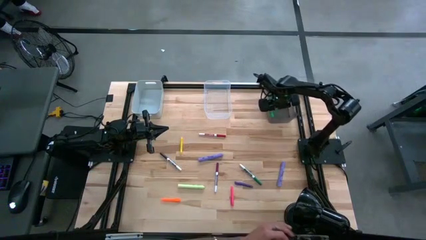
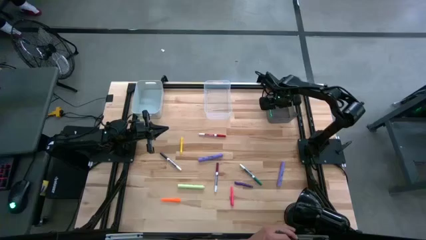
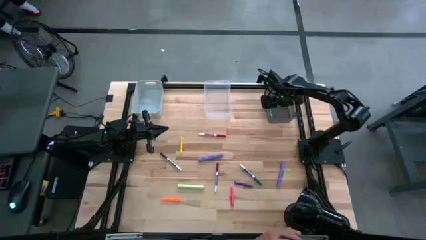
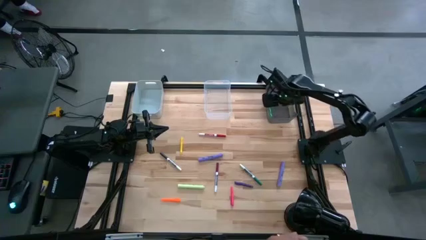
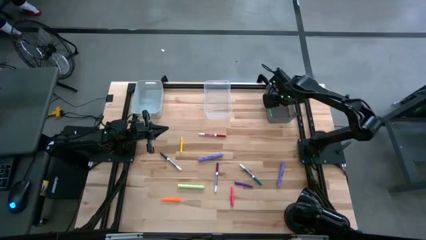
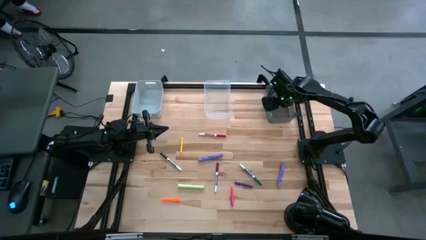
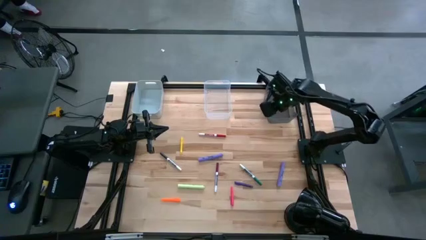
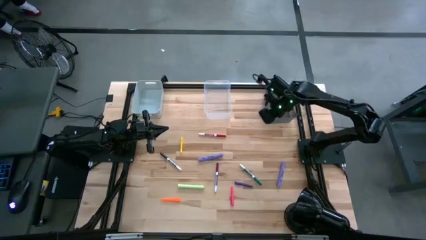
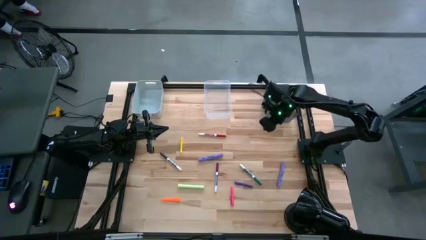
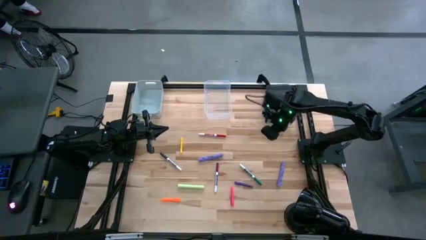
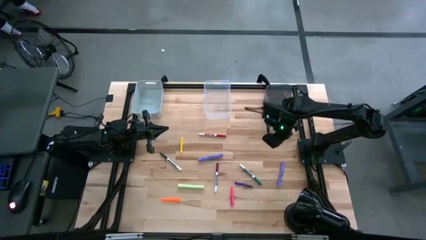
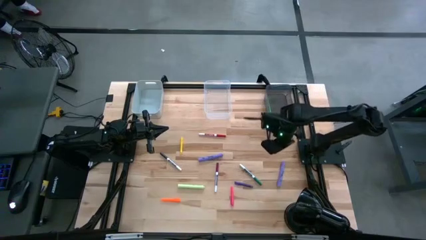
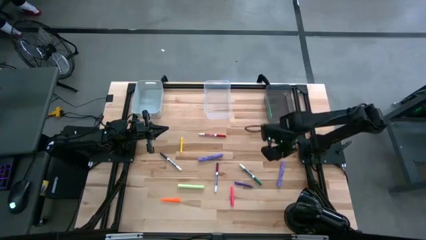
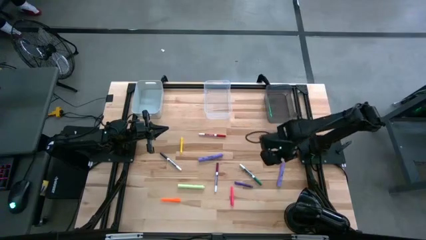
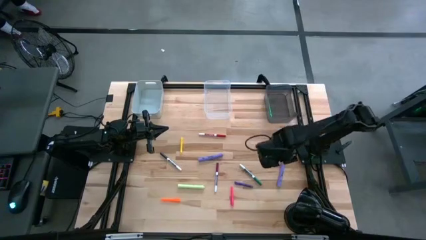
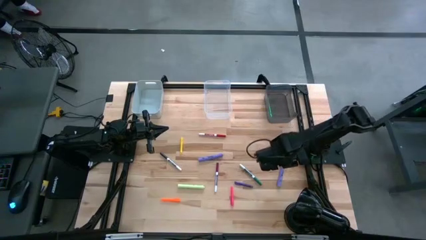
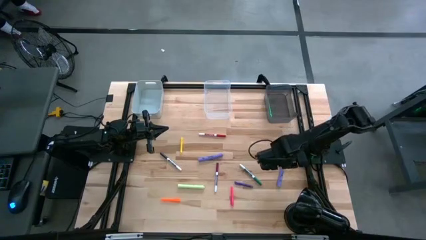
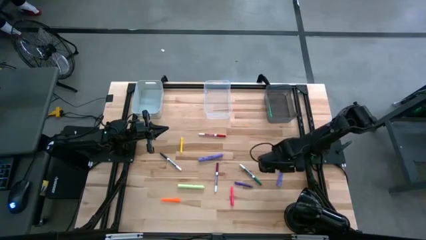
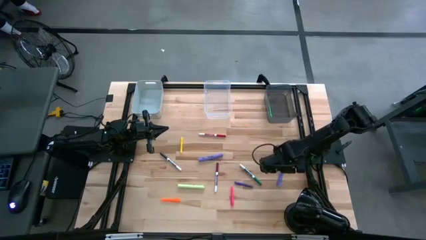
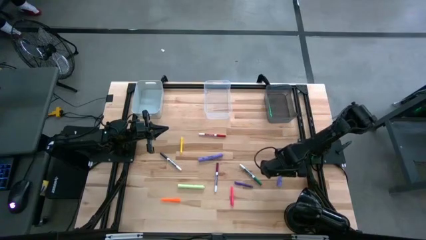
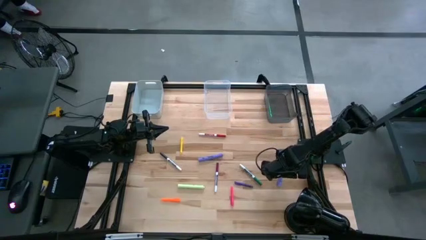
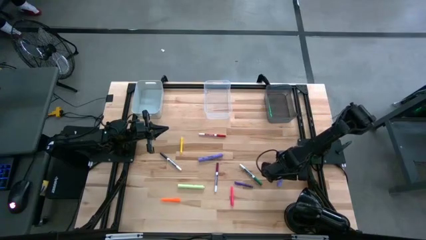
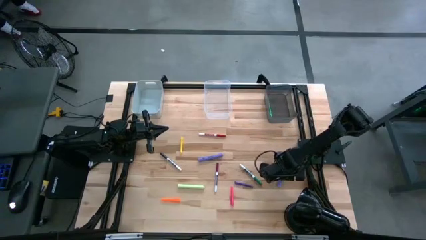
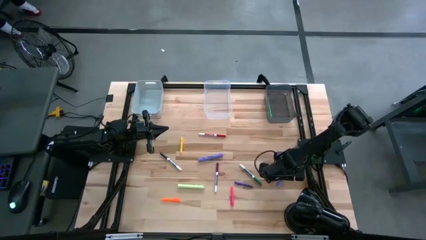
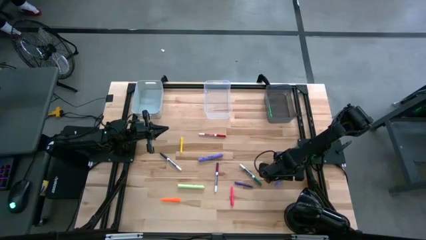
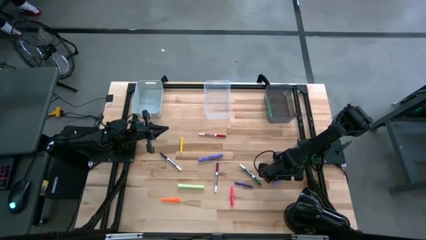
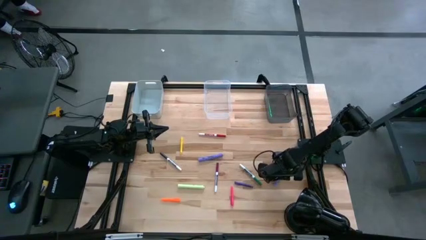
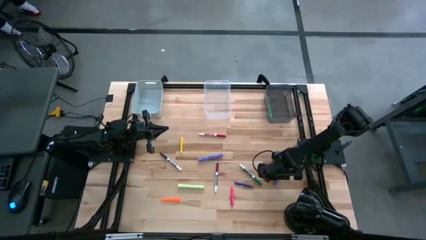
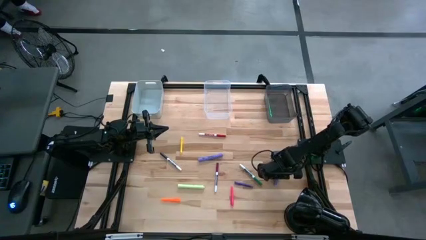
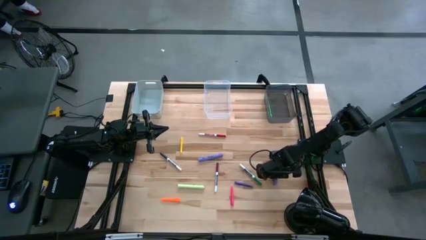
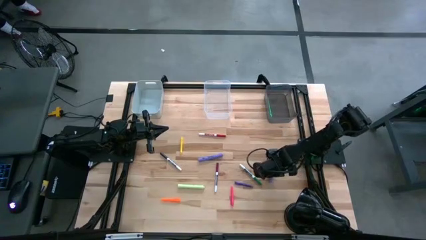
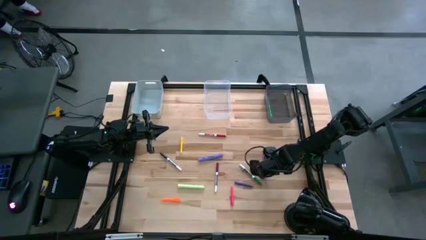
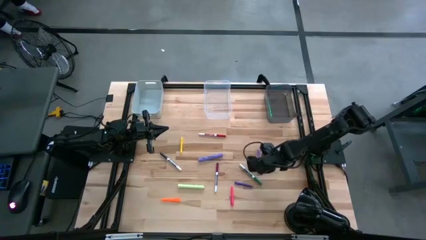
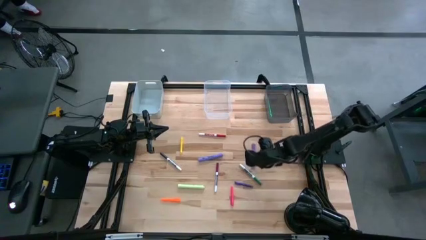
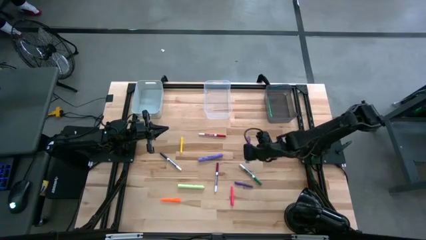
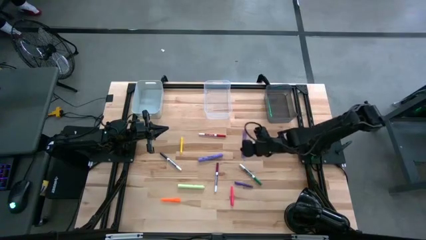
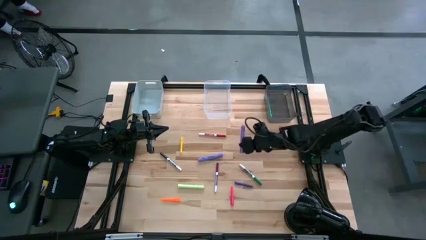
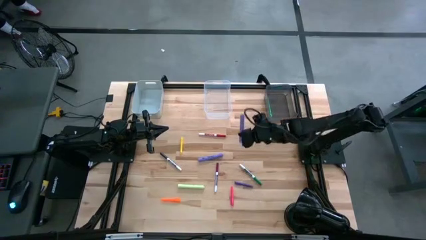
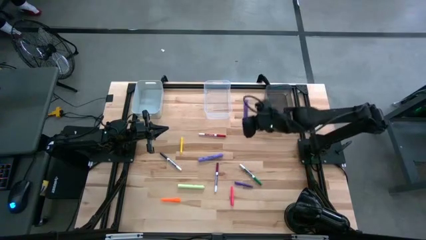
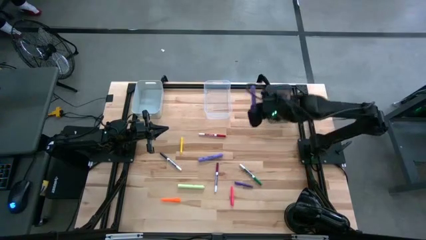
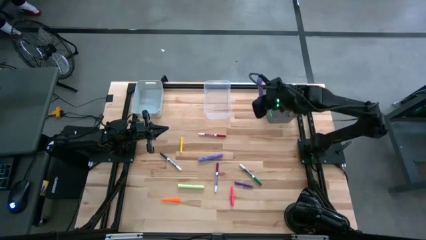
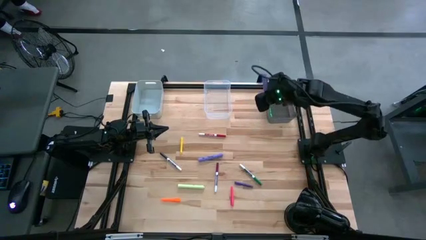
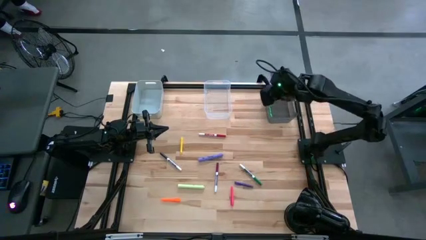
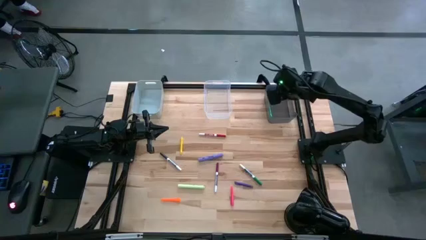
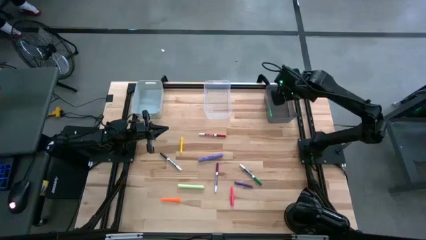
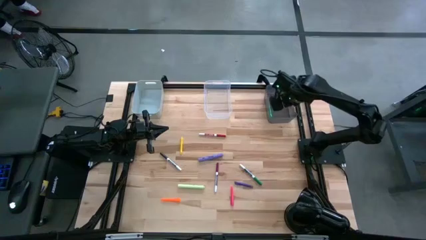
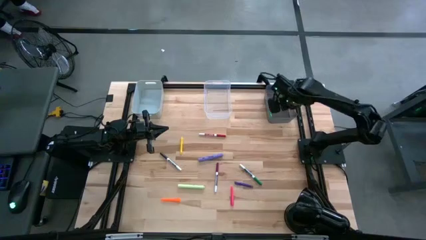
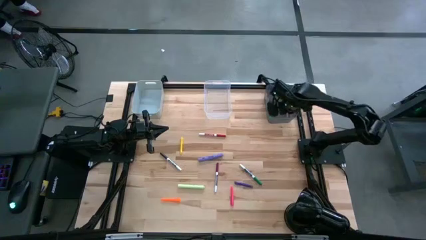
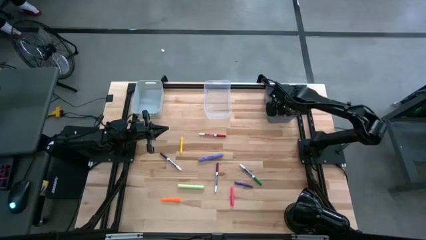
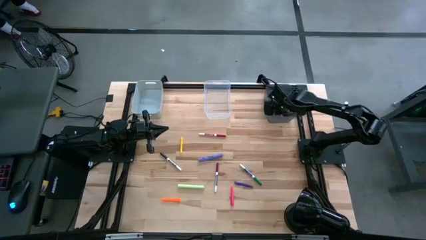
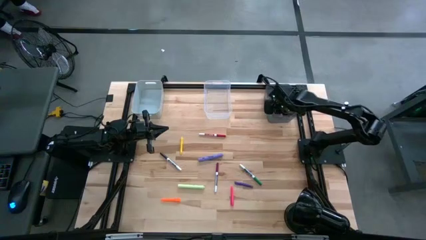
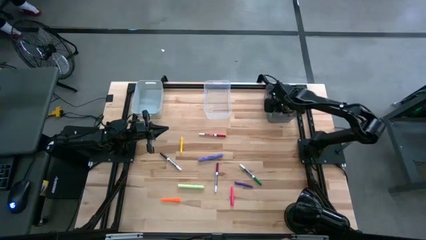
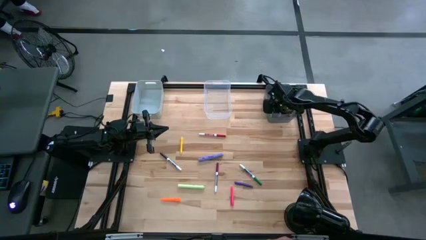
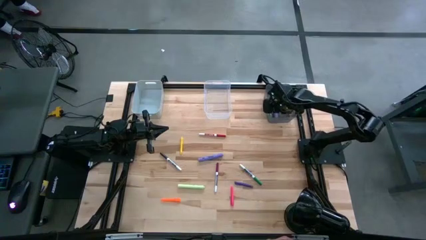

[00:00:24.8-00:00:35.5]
Task: Pick & Place Markers
Put the right purple highlighter pen into the black bin

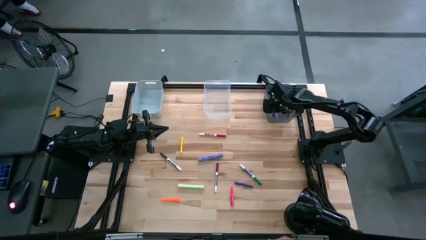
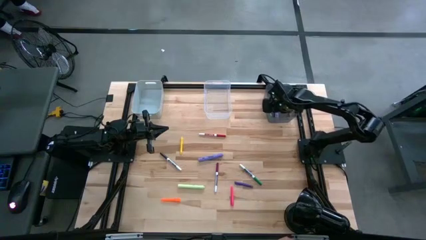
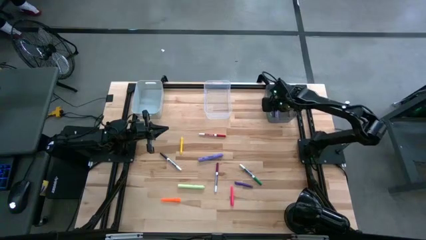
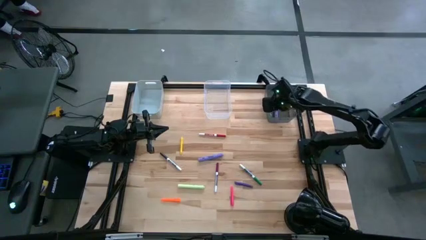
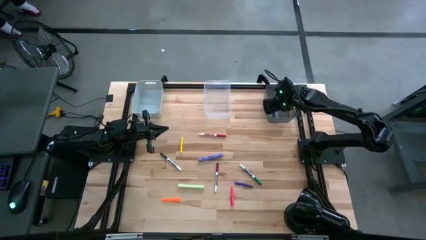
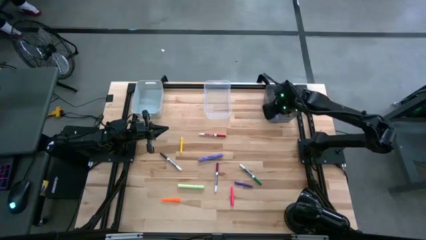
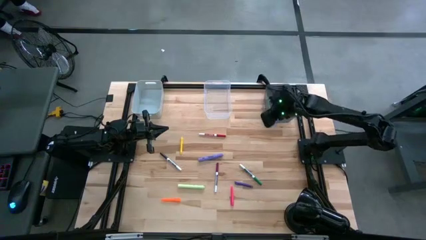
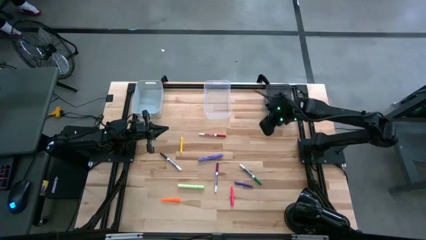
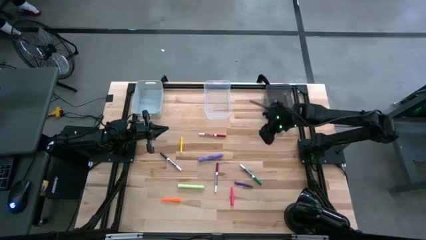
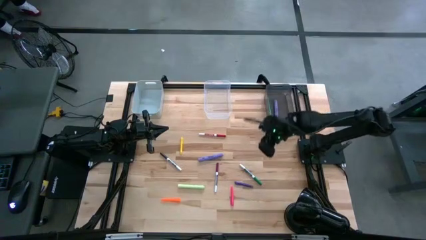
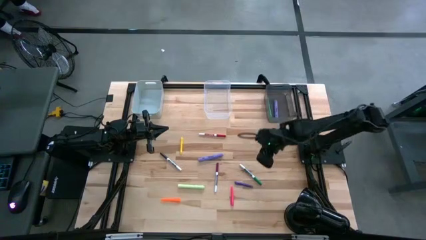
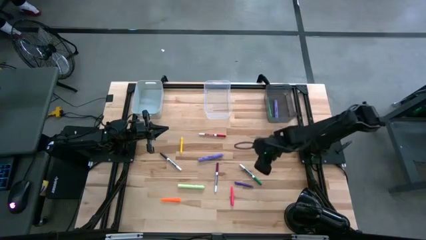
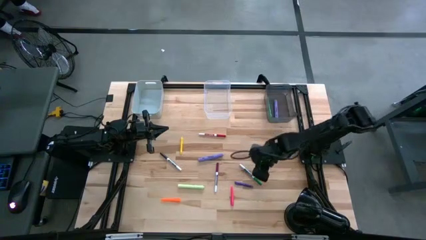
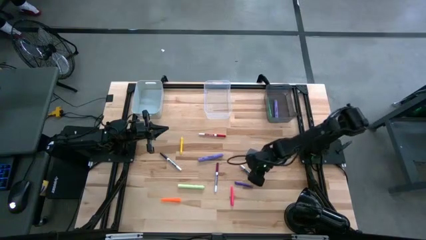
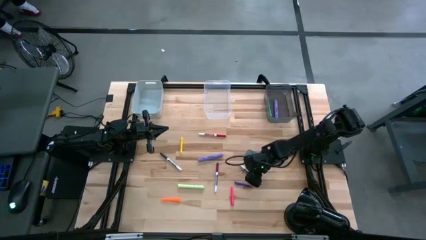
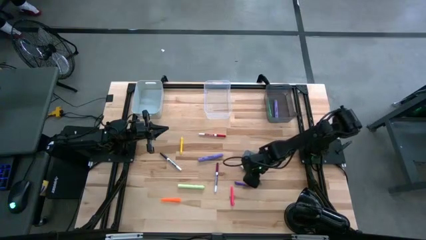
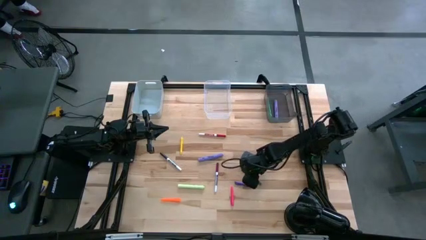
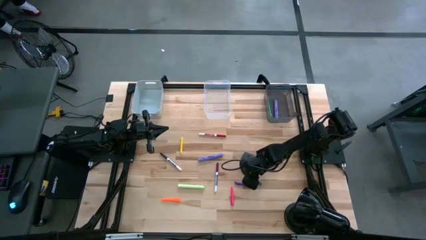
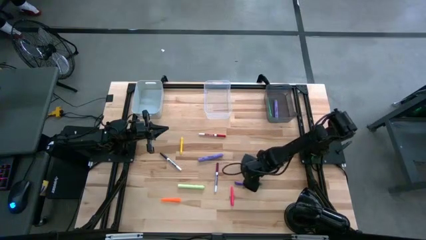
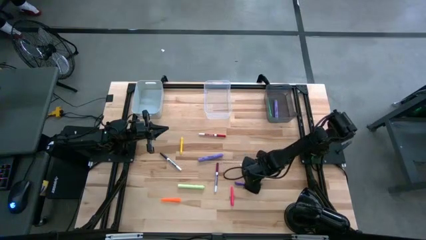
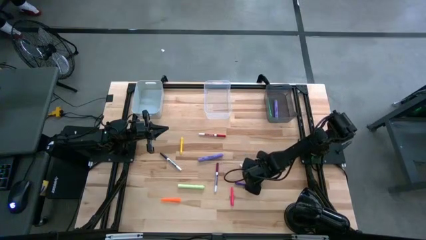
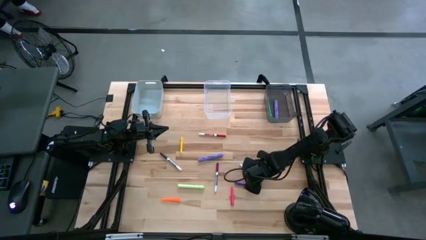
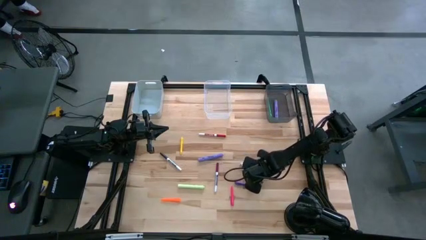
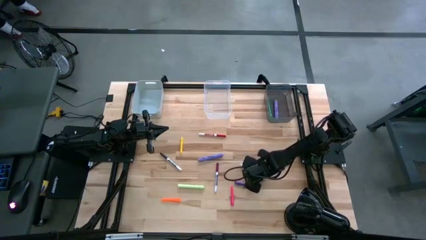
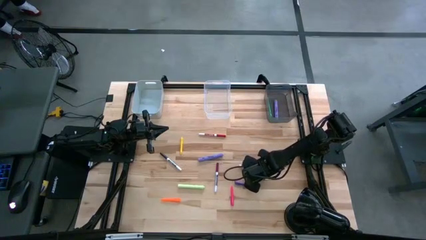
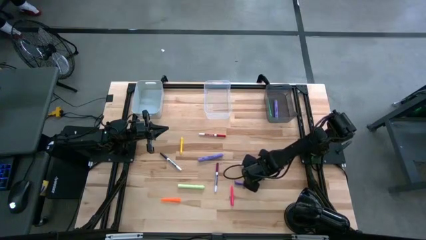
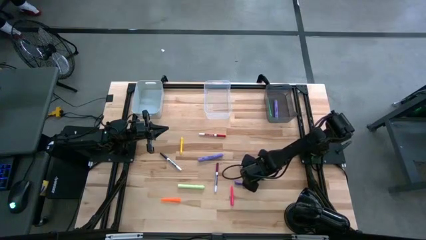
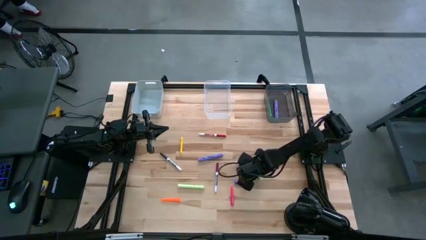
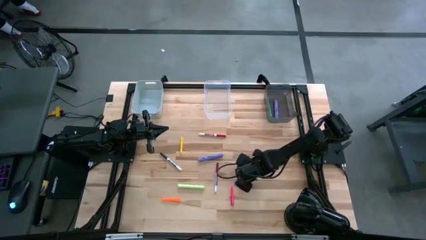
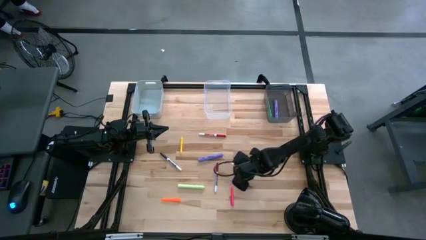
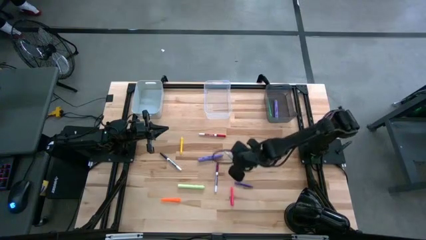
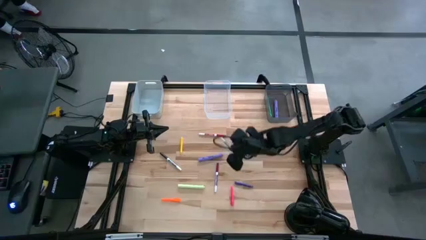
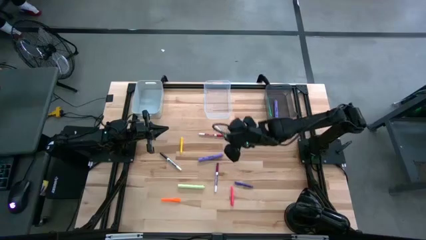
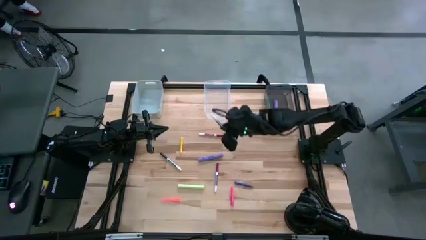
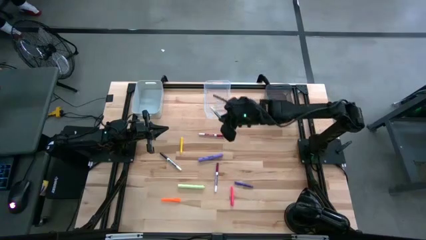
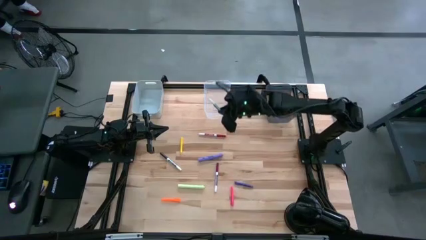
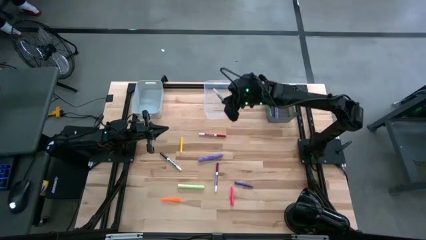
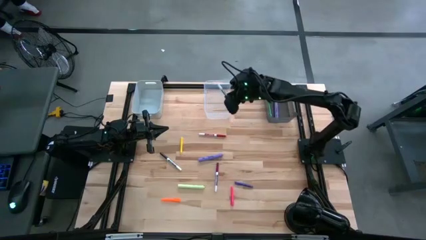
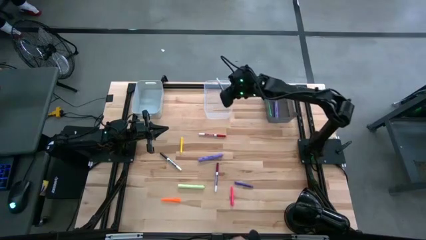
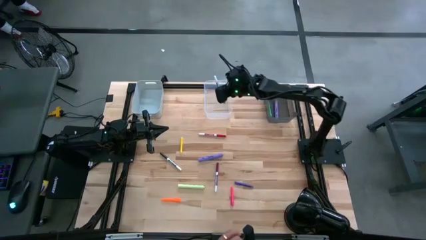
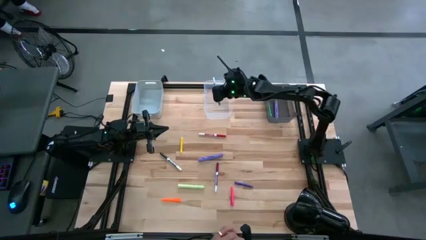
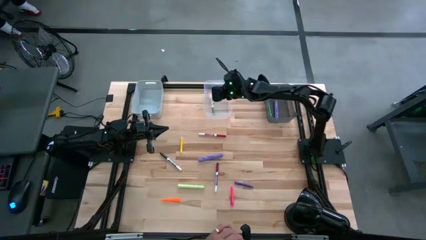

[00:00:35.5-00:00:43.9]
Put the green marker pen into the transparent bin
